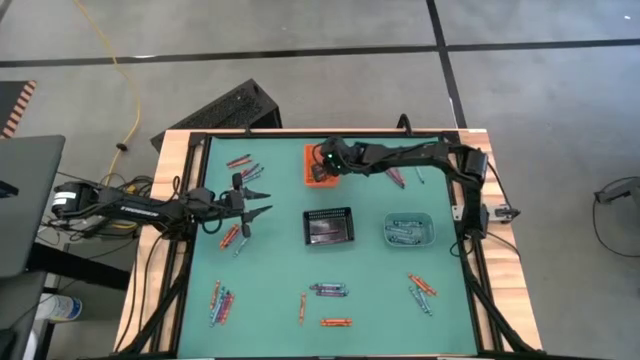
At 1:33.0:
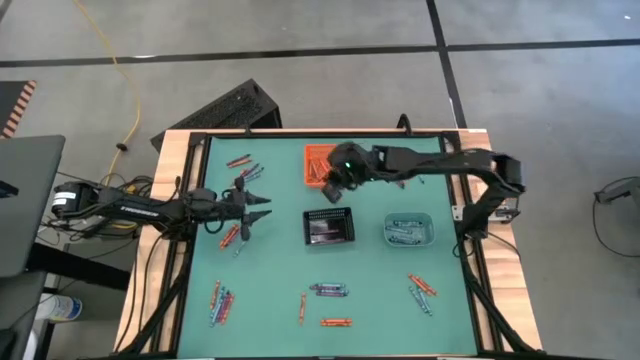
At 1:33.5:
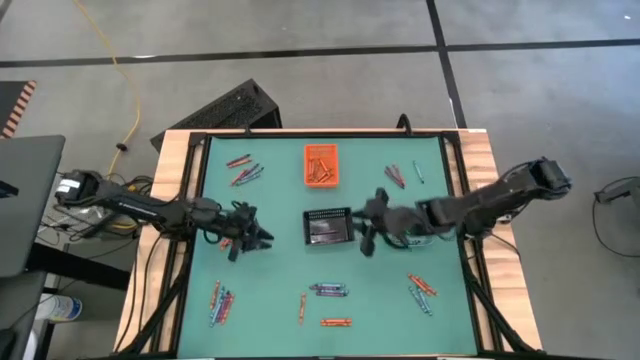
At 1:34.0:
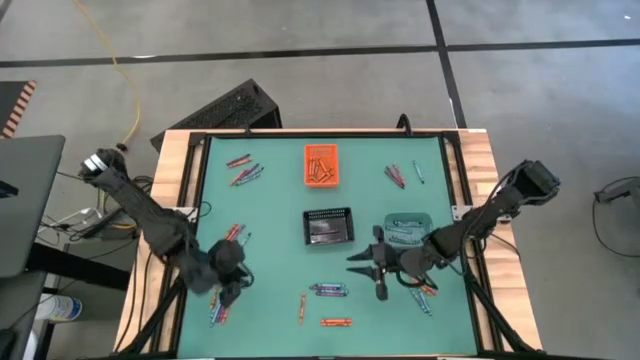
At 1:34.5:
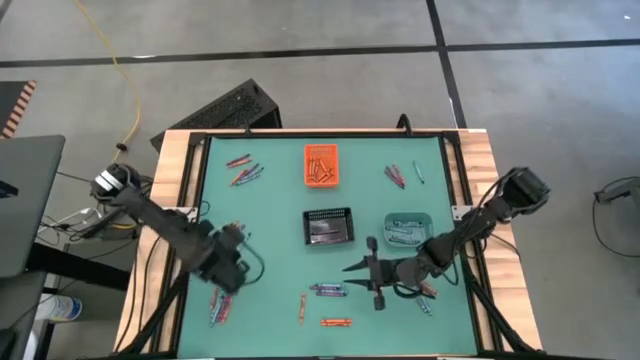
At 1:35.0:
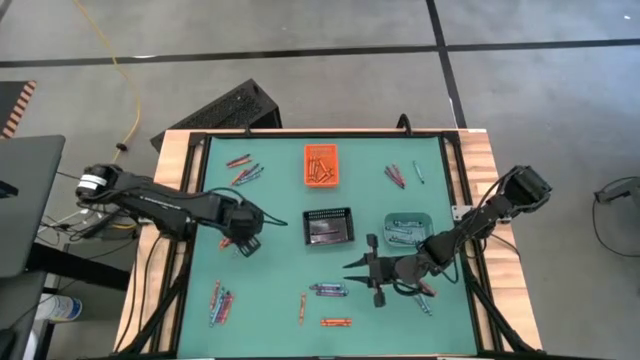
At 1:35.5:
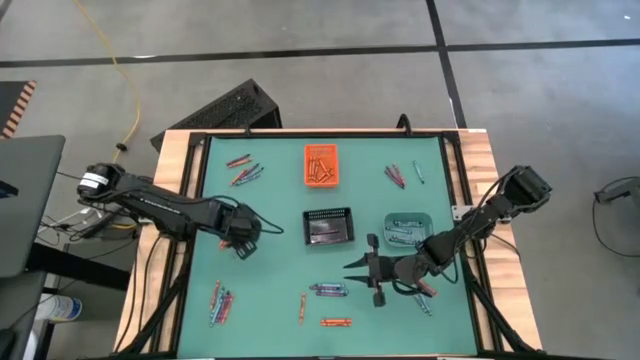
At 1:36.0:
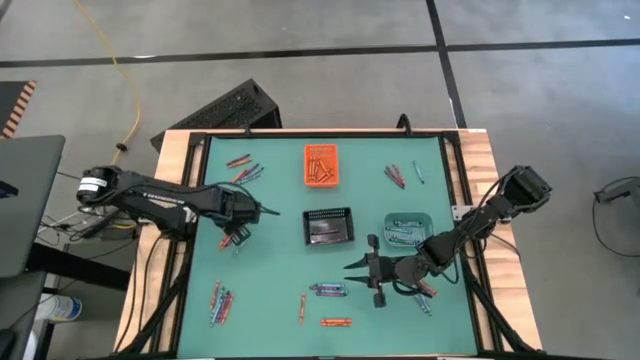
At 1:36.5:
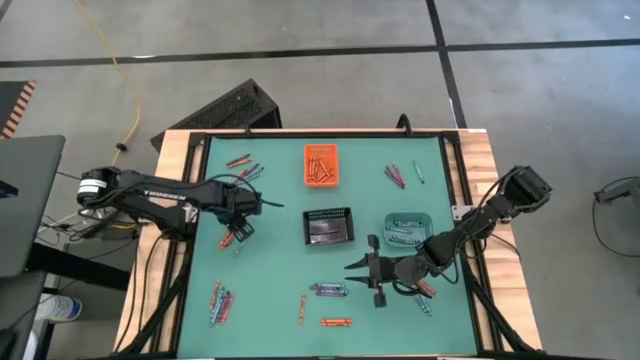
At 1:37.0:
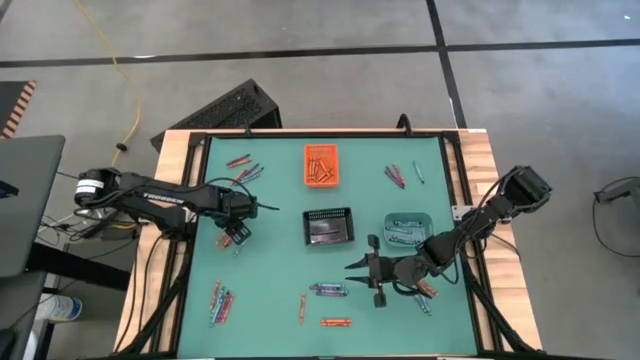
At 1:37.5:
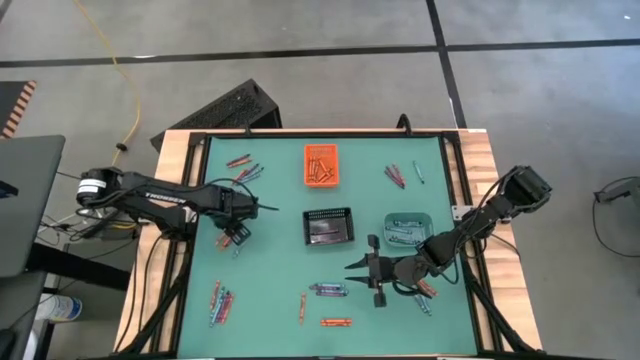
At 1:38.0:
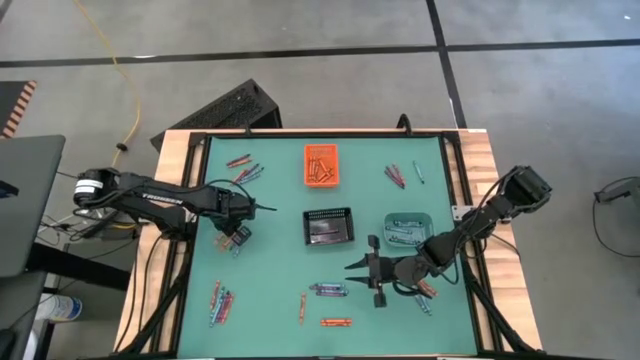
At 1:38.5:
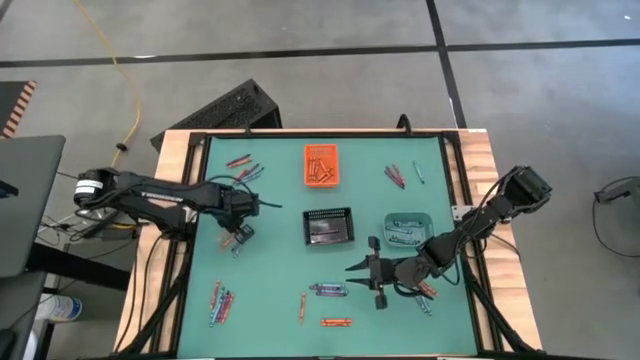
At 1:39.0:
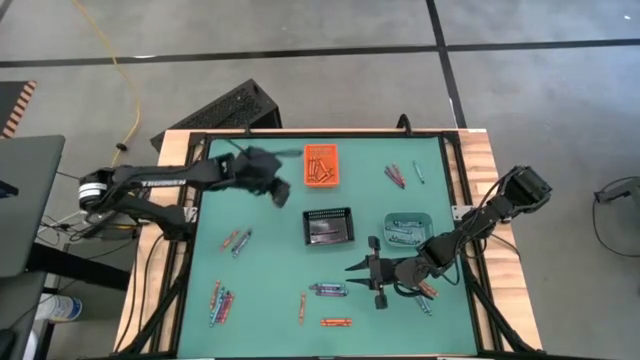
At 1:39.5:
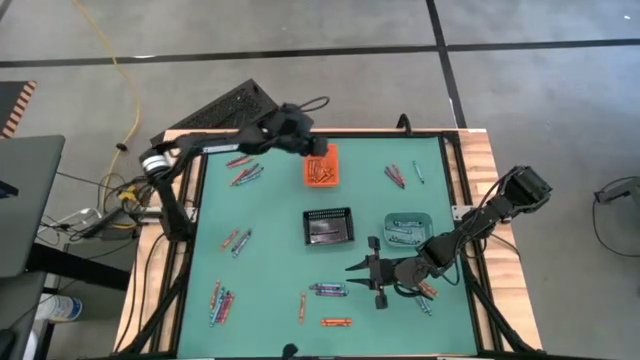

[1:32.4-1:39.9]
Task: Sort crayons
Put the orange crayon into the orange bin

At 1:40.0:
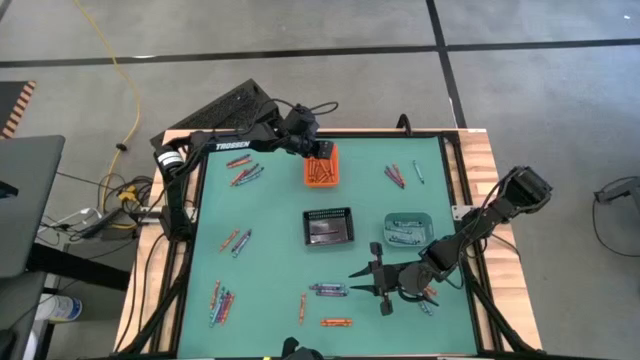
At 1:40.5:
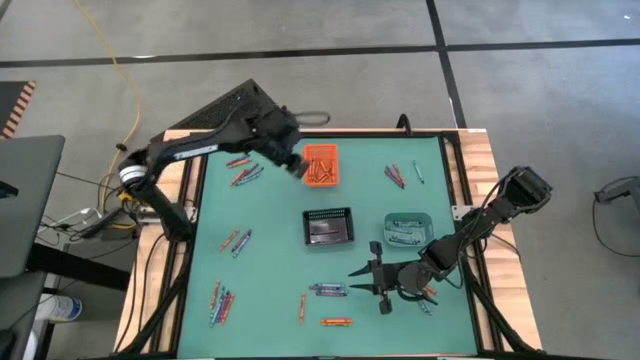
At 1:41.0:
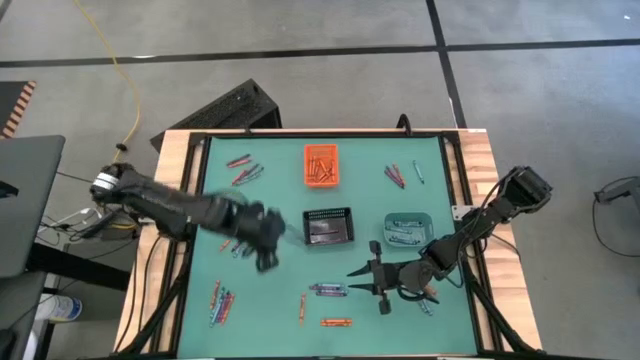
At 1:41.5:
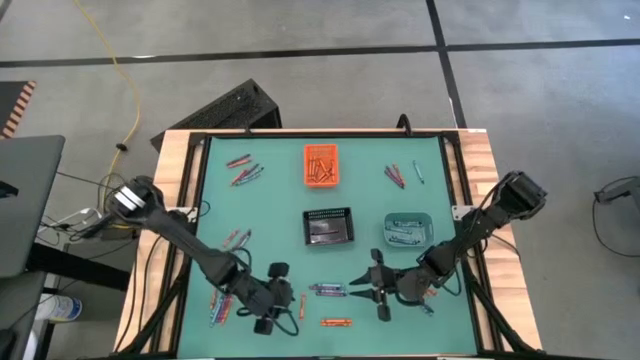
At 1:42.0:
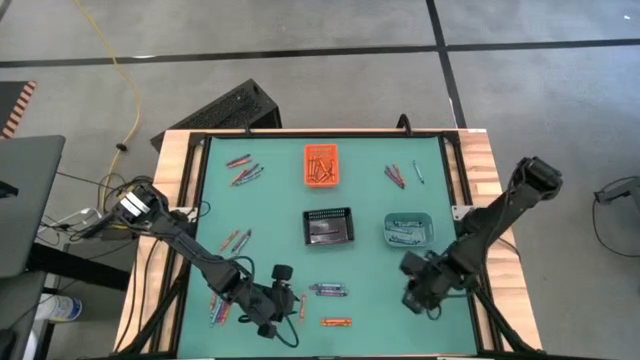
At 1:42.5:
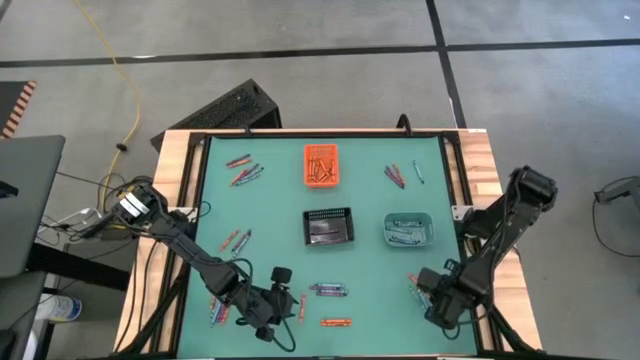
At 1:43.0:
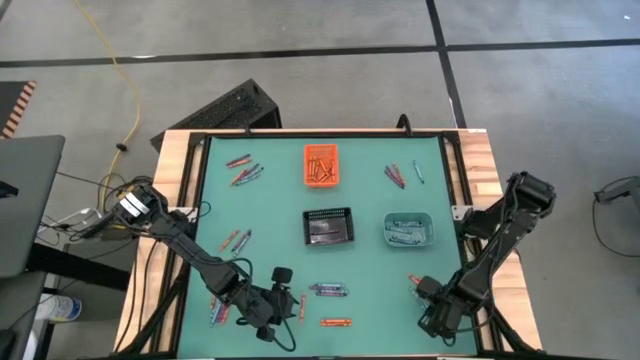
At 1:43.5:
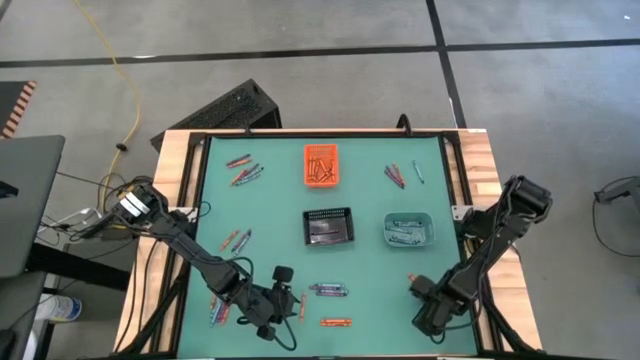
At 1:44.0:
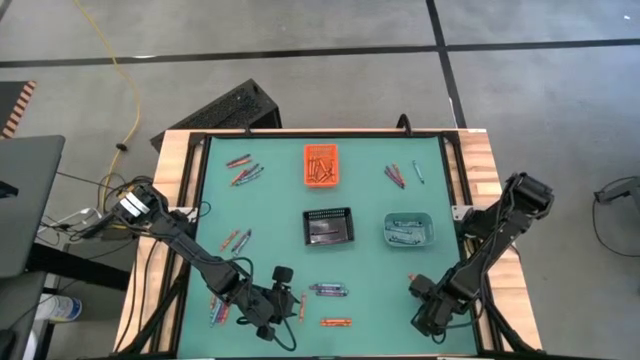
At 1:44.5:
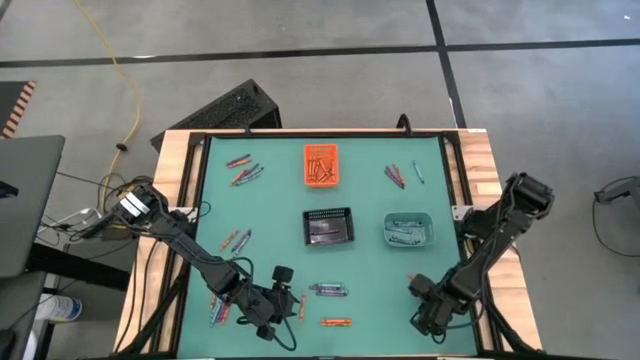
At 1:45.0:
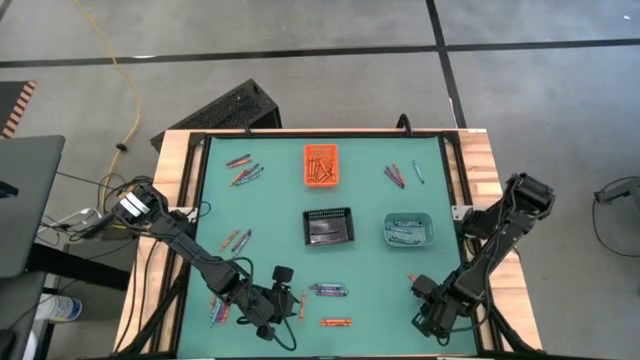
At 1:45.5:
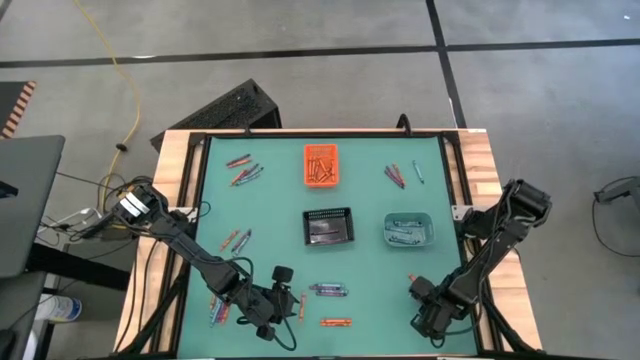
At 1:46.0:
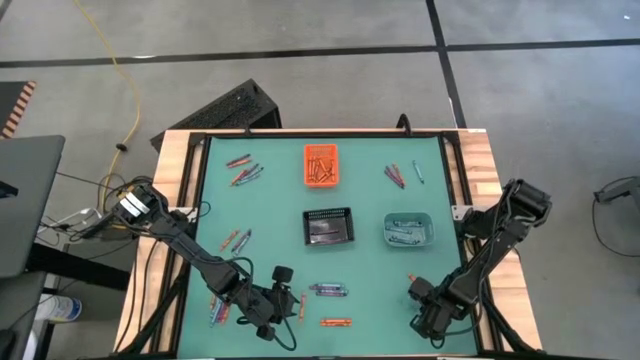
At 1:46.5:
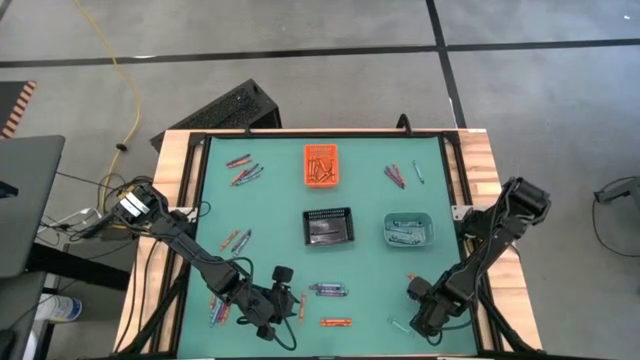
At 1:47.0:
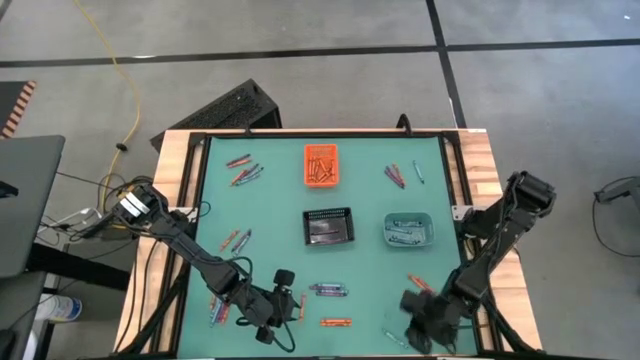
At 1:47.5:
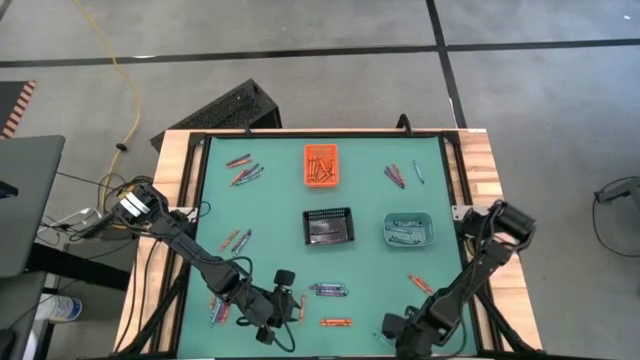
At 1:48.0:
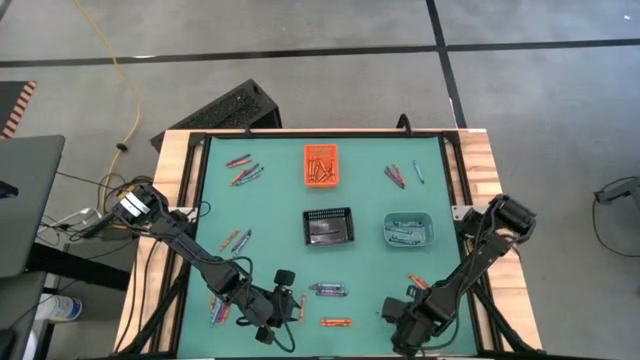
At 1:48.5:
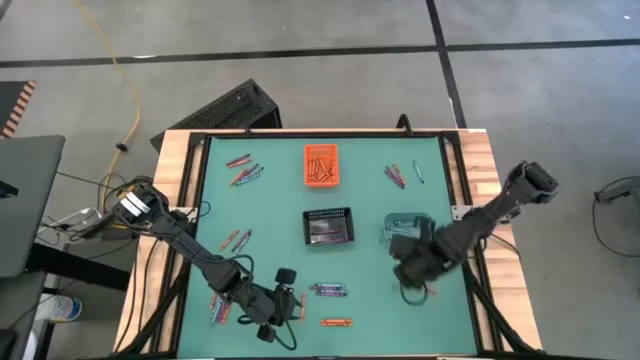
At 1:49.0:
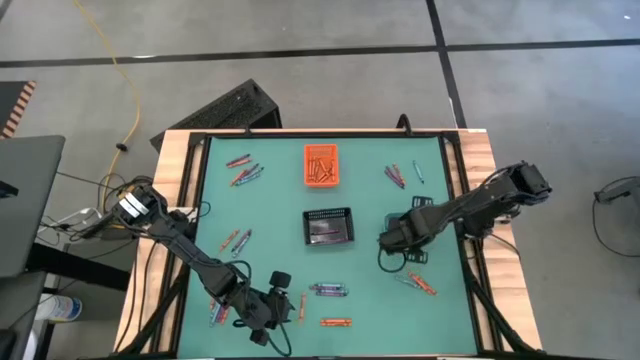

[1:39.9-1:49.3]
Put the blue crayon into the green bin

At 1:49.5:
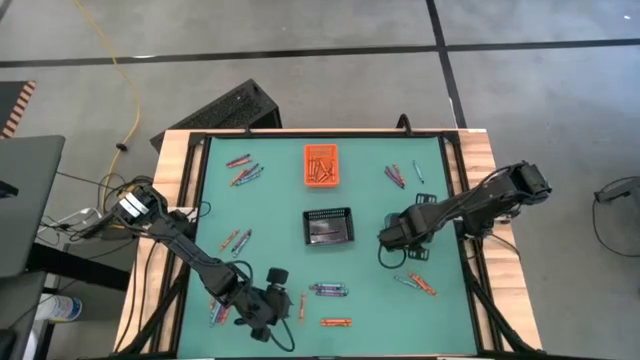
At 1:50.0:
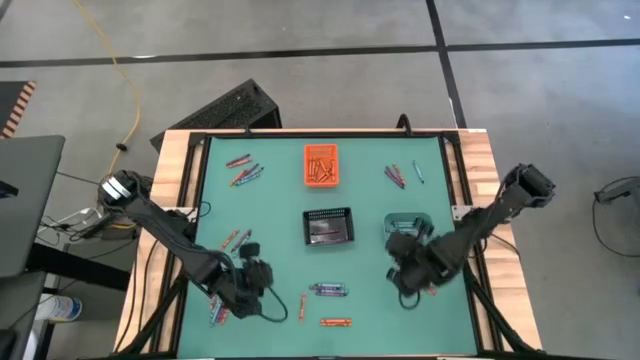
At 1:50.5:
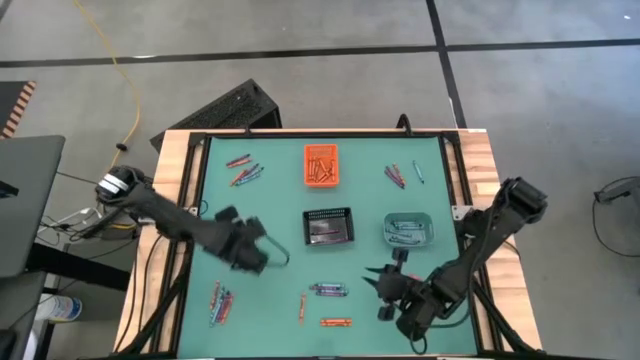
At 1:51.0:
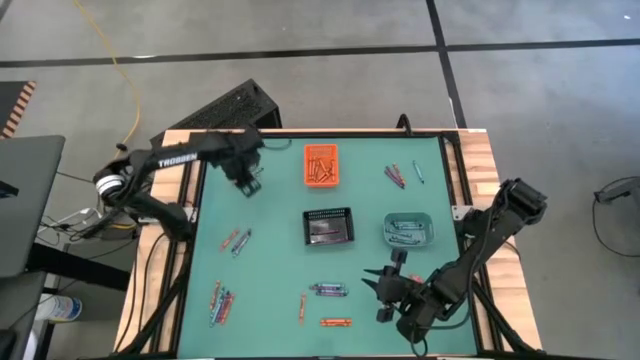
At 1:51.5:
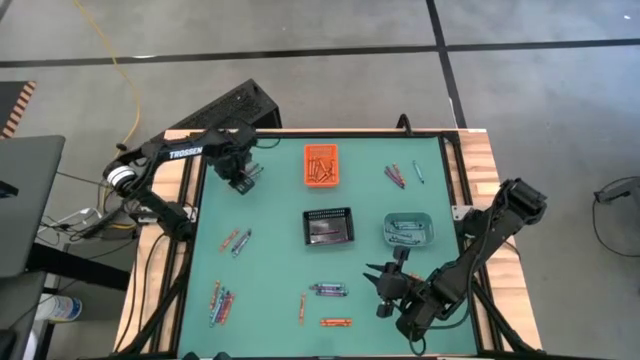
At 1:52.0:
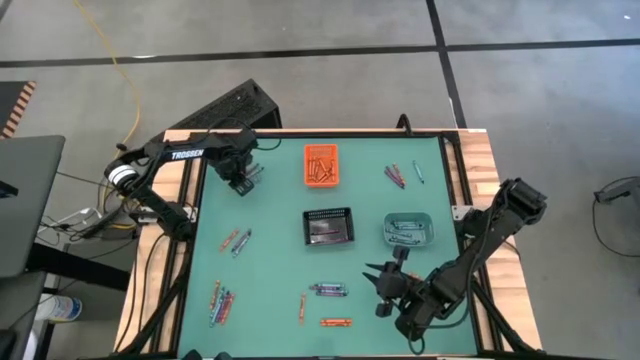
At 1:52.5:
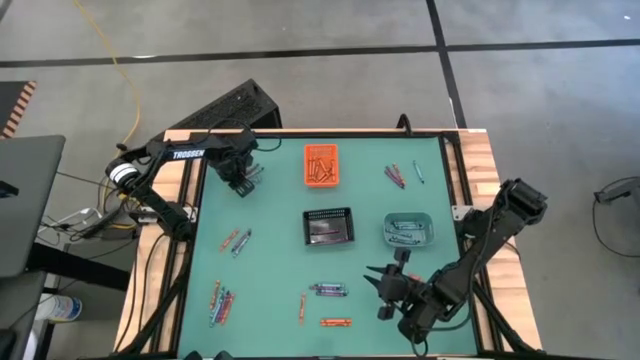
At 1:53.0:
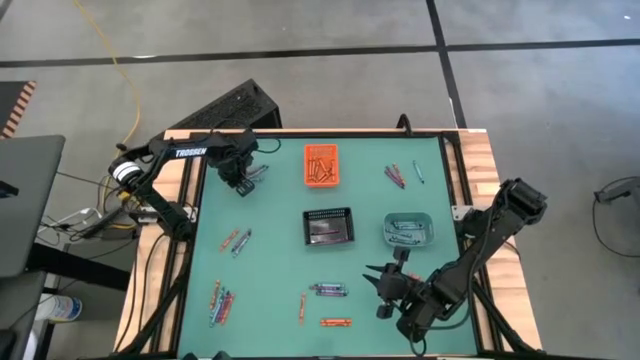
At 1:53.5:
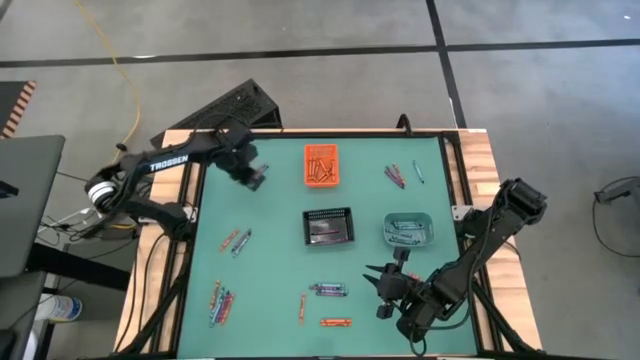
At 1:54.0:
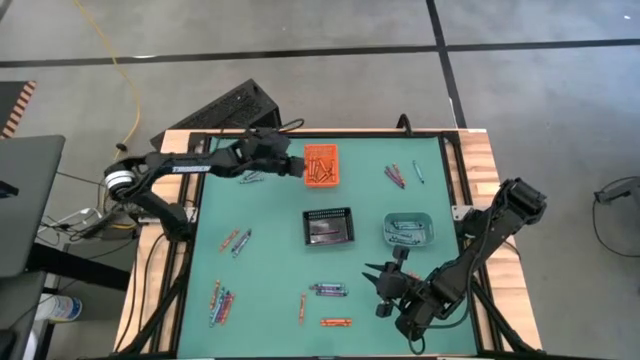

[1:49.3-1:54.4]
Put the orange crayon into the orange bin
